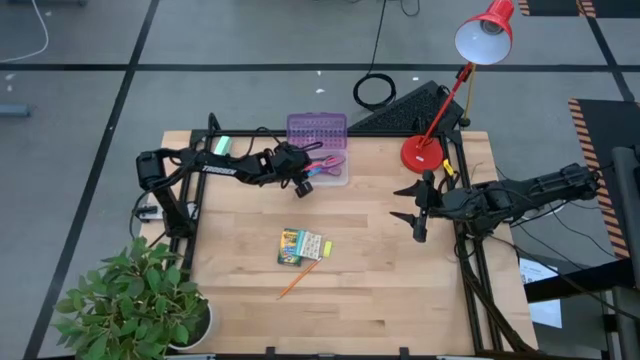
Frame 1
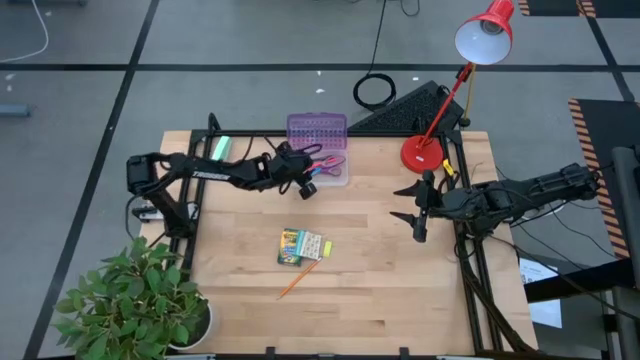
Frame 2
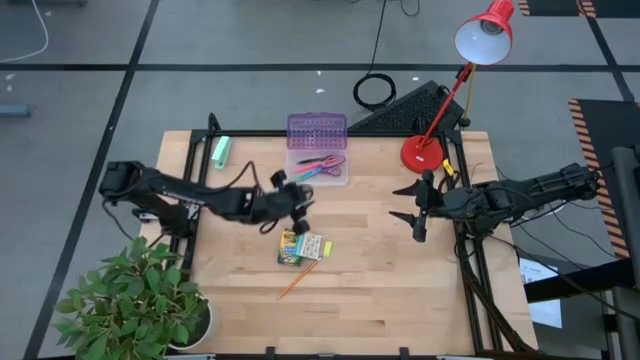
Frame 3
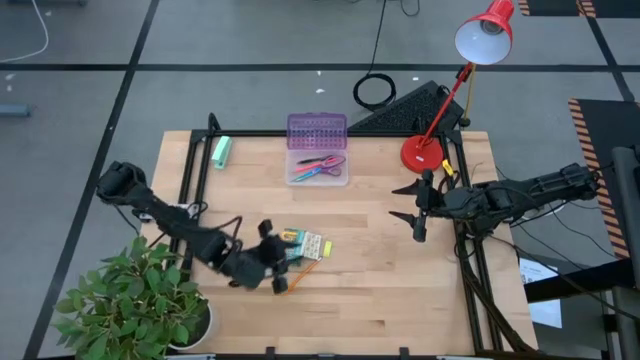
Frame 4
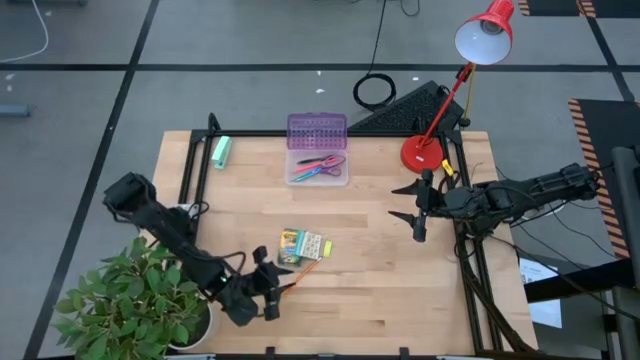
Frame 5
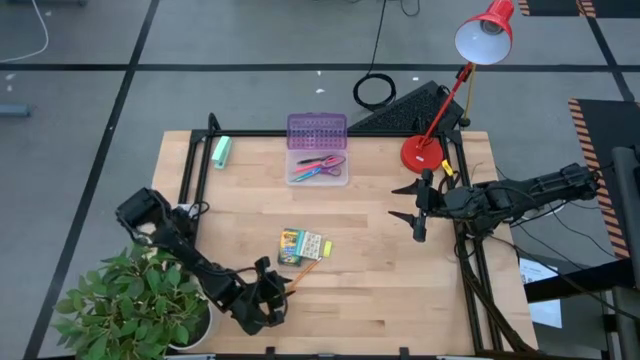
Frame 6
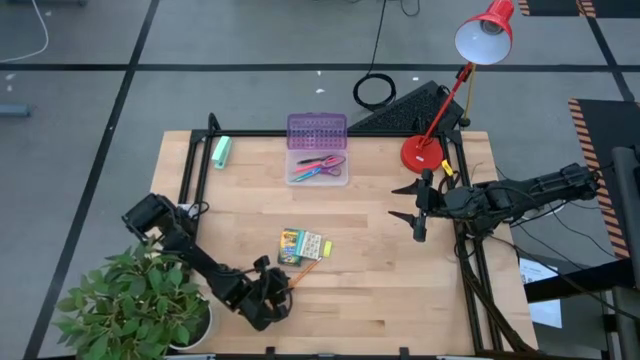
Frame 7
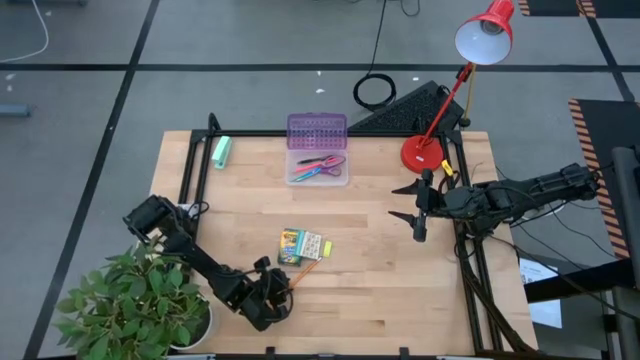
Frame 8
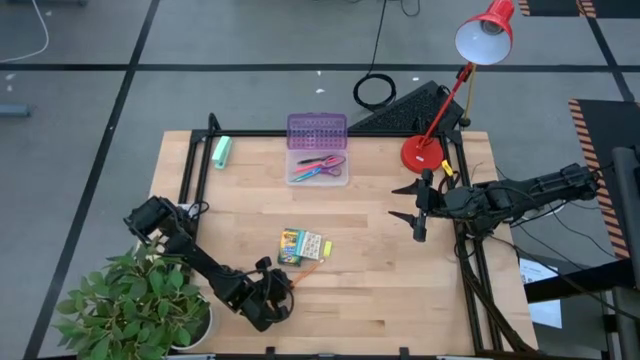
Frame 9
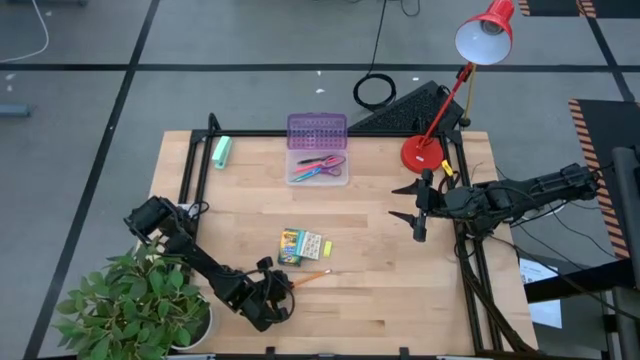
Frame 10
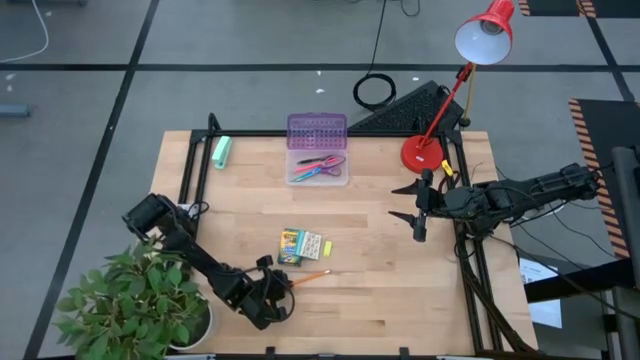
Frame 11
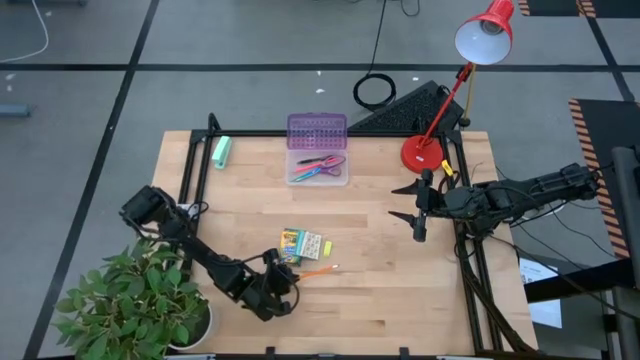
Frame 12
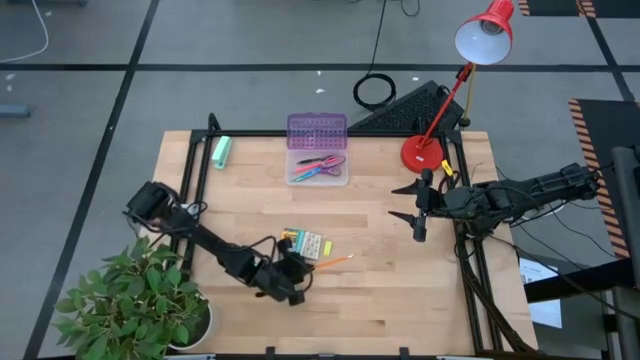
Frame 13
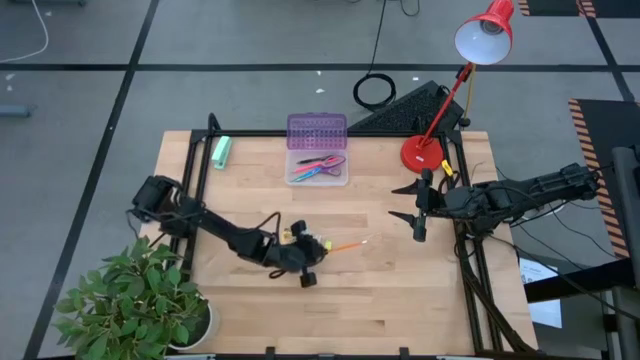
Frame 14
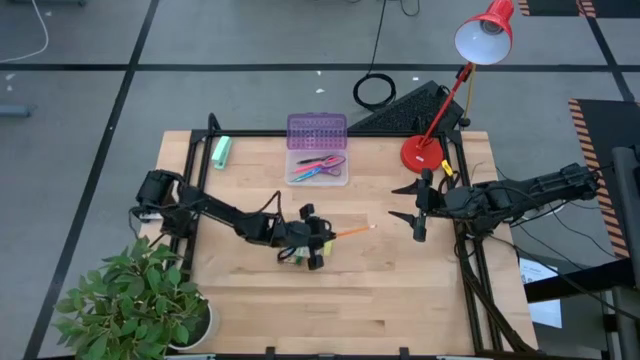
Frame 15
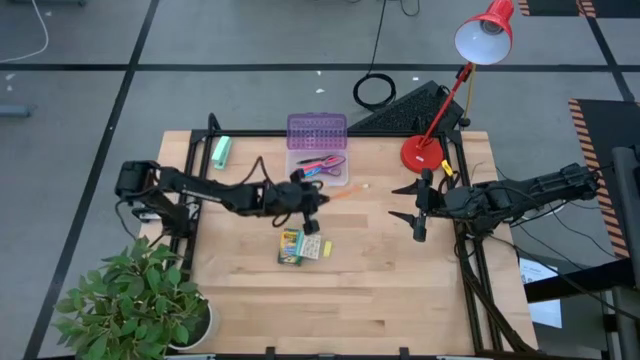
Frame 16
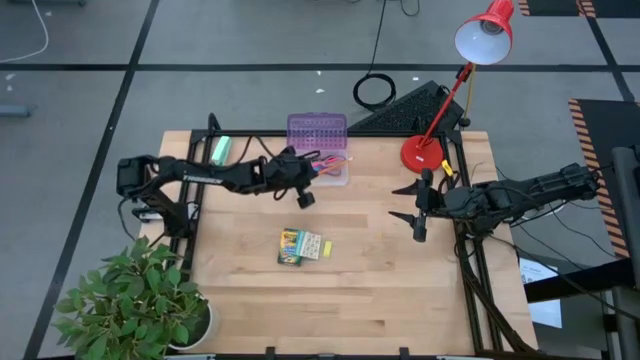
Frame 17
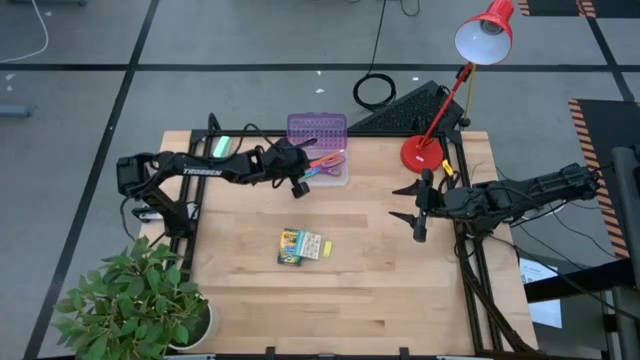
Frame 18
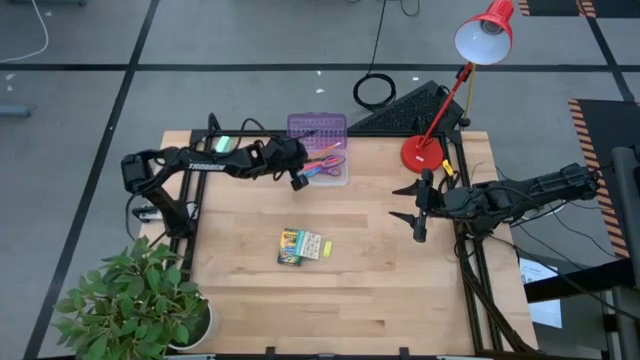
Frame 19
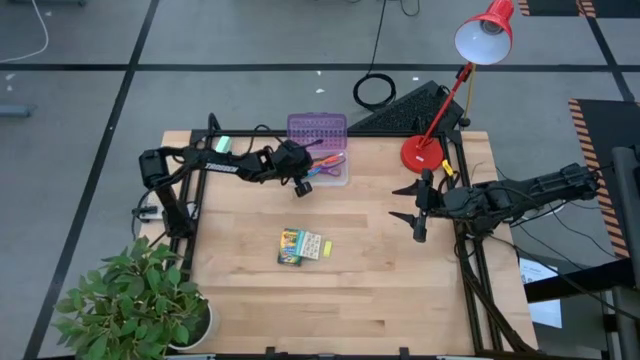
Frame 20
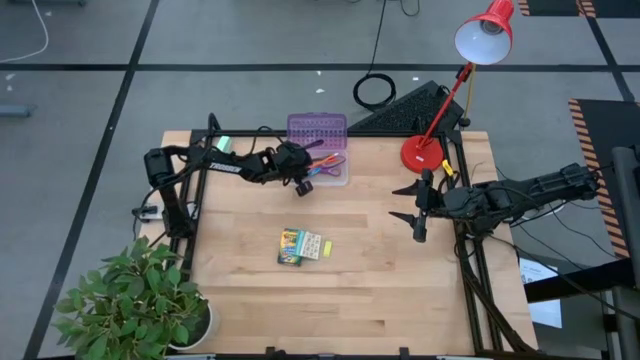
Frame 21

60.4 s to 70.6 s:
Task: Pack school essentials
Put the yellow pencil into the purple supply box

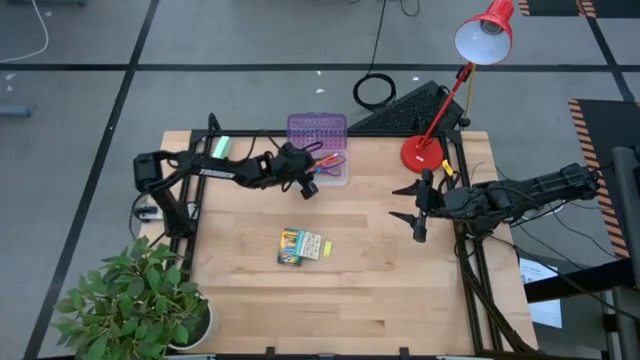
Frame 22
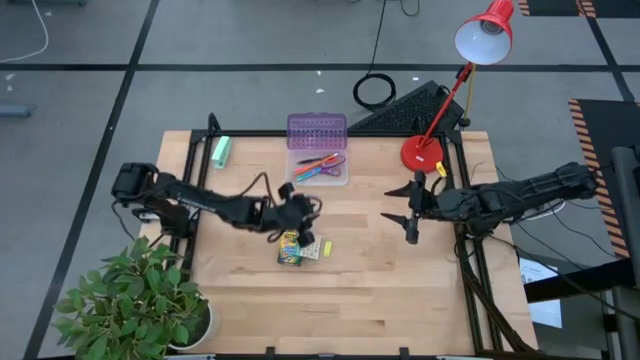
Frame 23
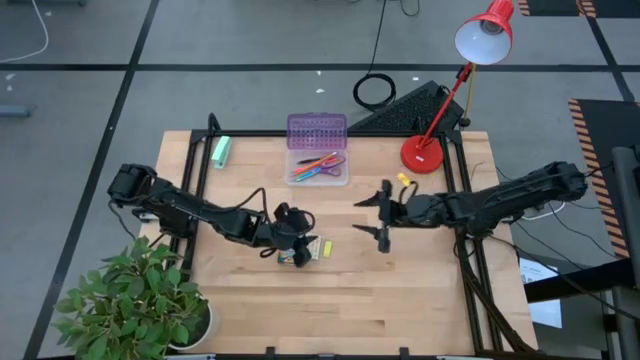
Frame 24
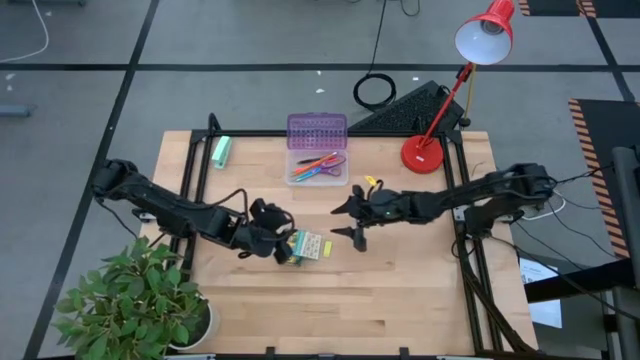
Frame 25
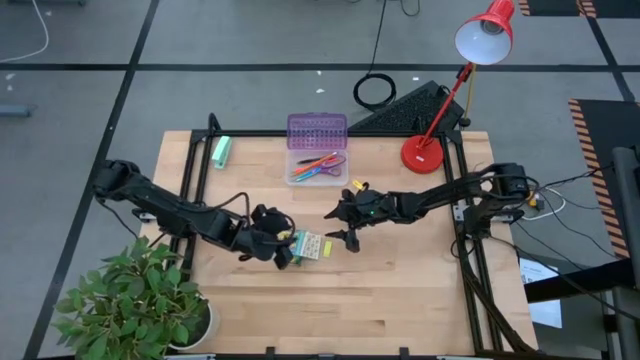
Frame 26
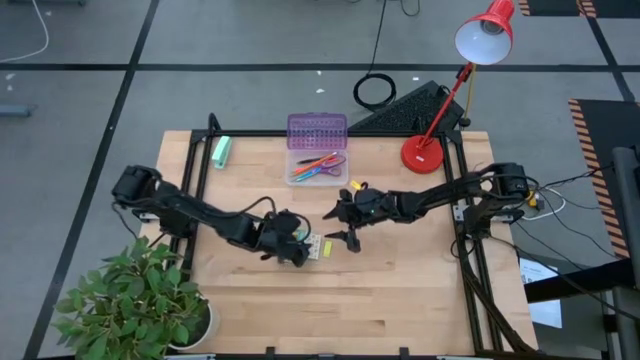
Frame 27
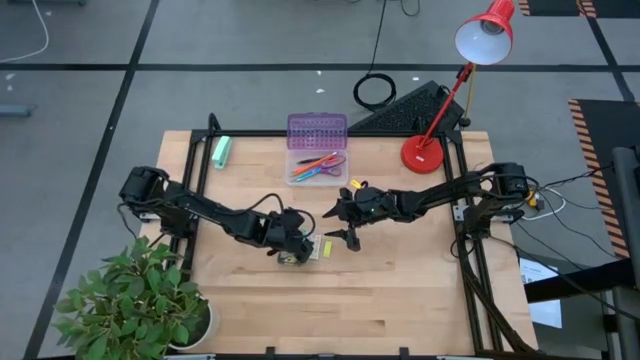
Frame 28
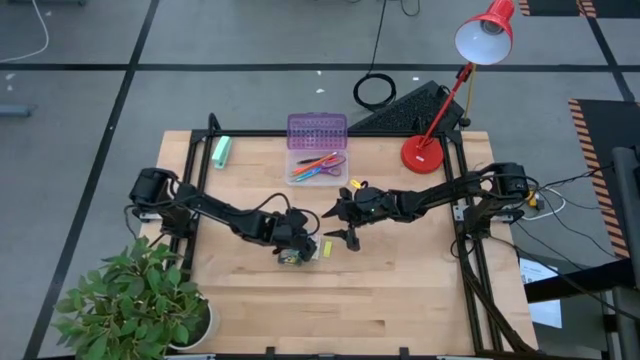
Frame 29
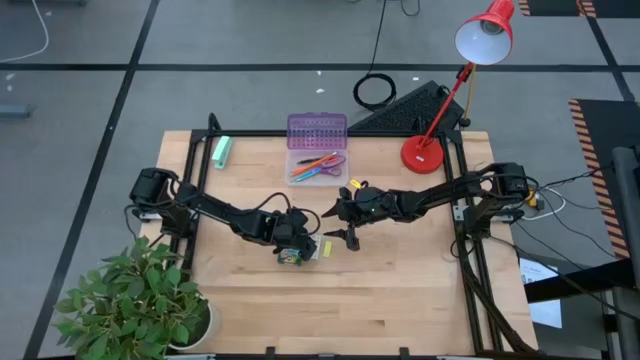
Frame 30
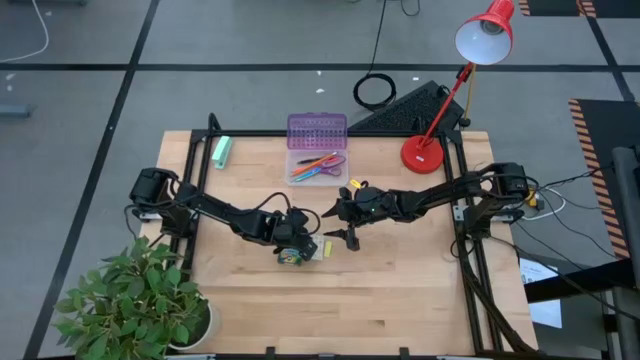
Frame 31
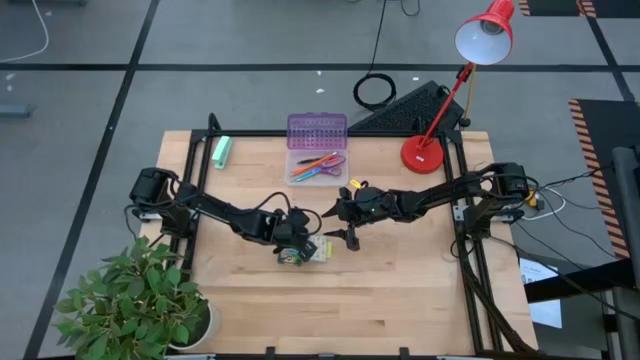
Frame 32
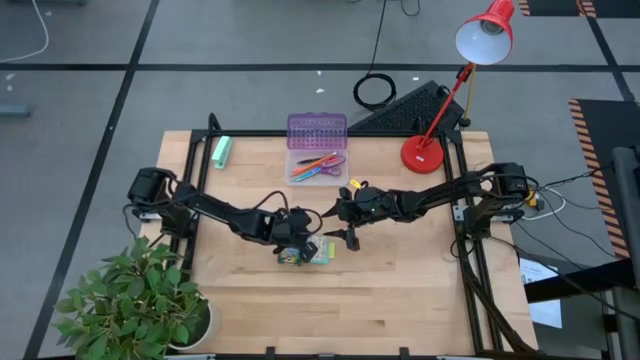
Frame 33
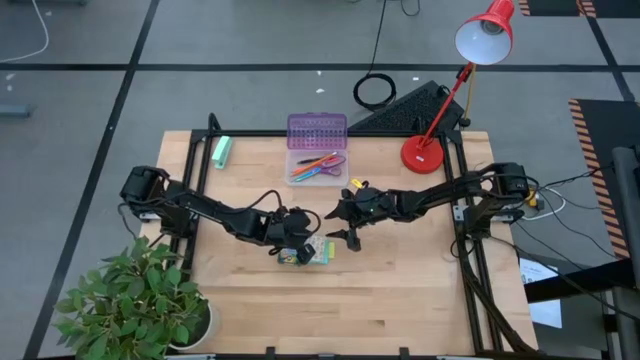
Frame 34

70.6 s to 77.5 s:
Put the blue sticky notes into the purple supply box

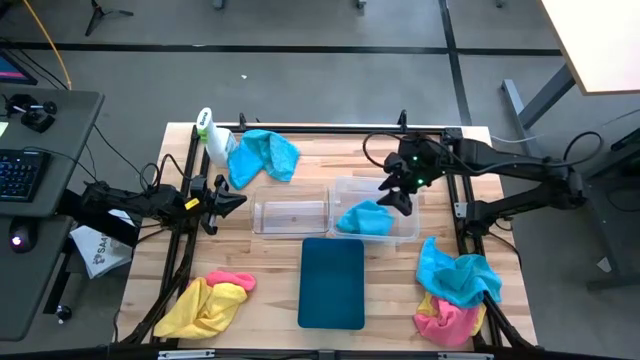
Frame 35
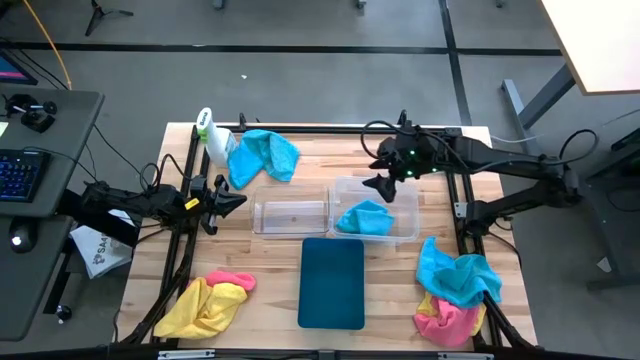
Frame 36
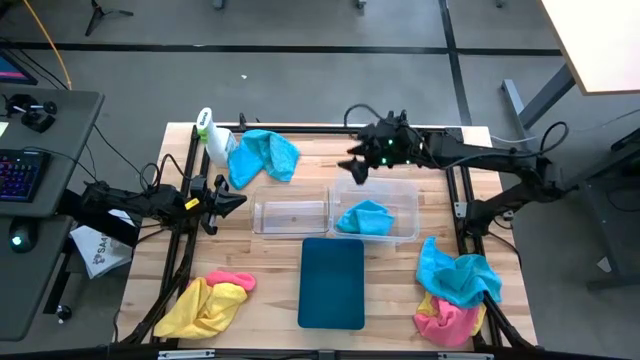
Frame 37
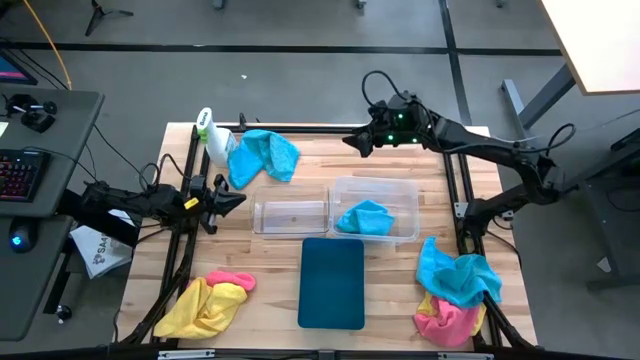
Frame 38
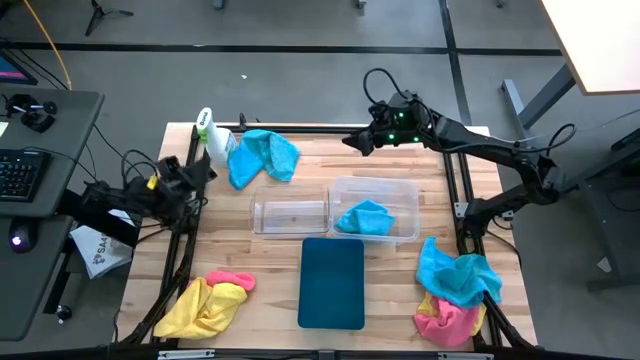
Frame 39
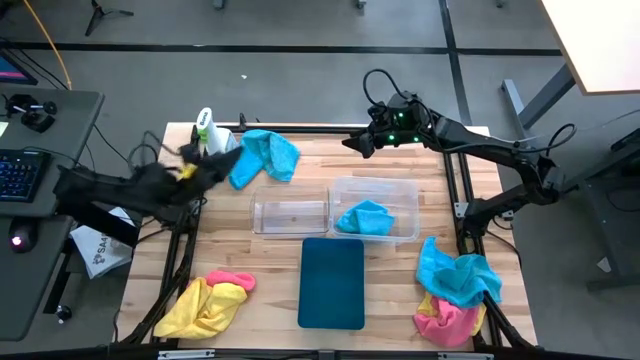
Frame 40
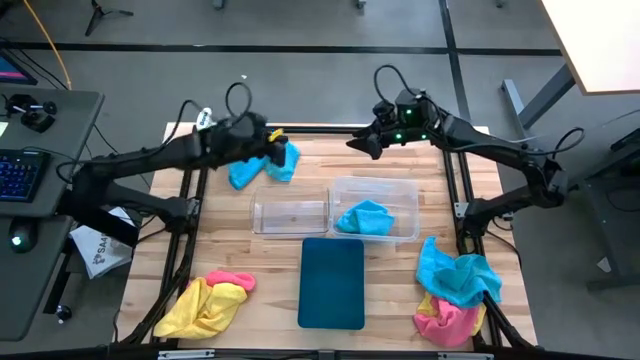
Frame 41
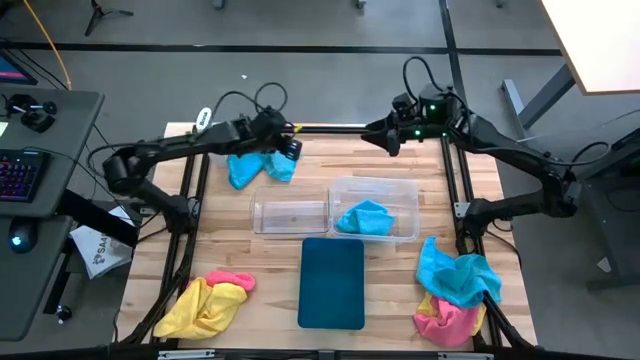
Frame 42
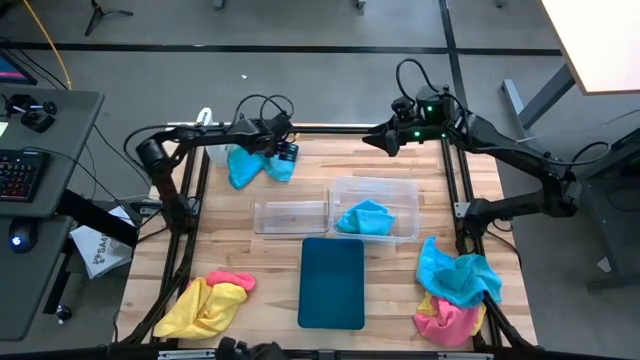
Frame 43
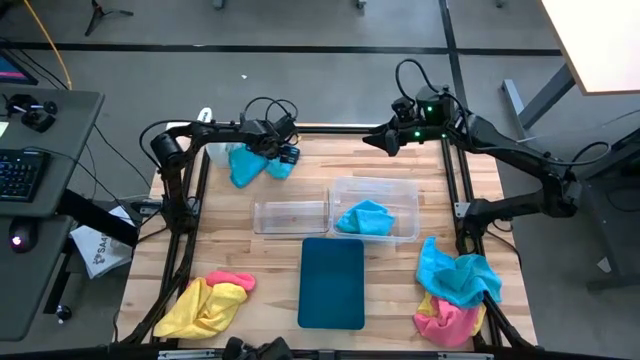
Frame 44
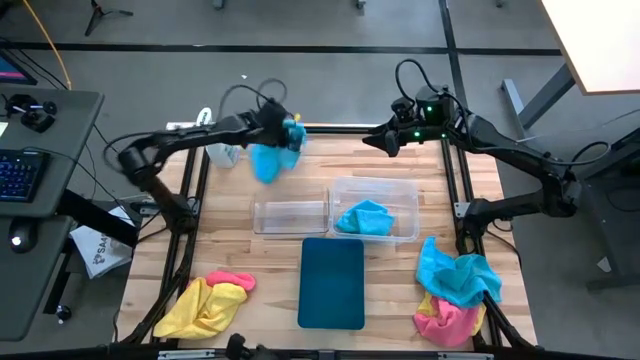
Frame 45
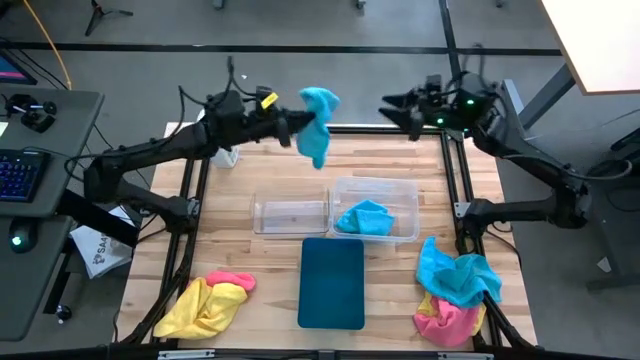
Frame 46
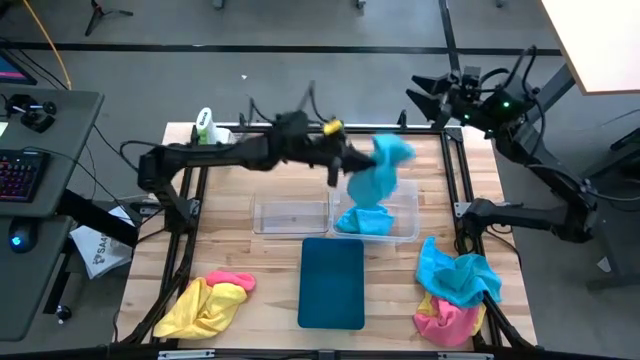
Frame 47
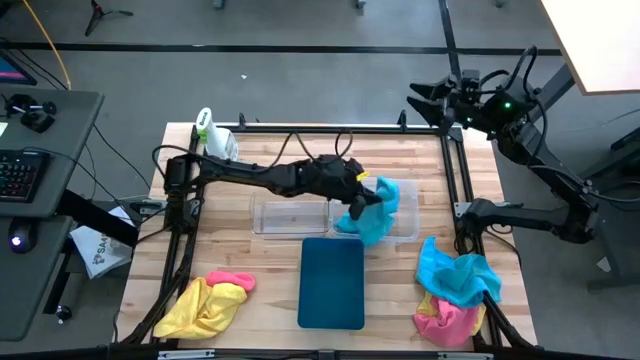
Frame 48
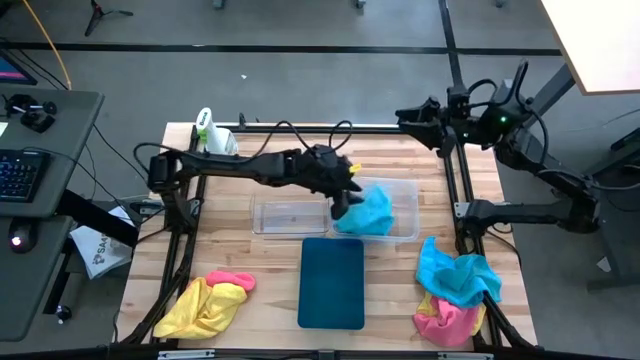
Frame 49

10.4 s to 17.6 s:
Task: Sort microfiber towel by color & place in baskets
Put the top blue microfiber towel into the white bin
